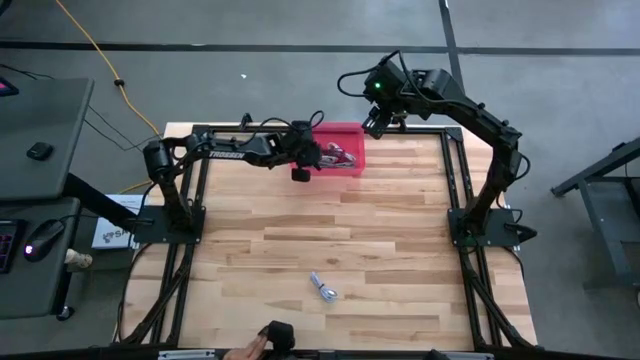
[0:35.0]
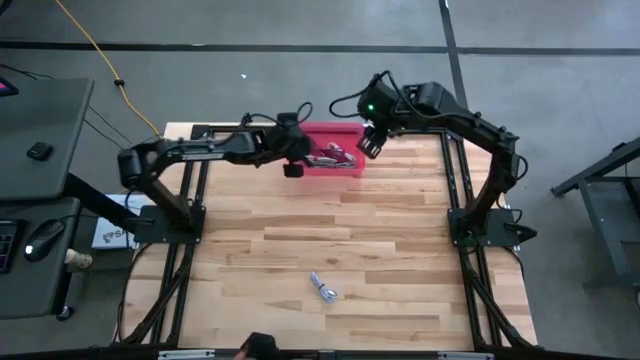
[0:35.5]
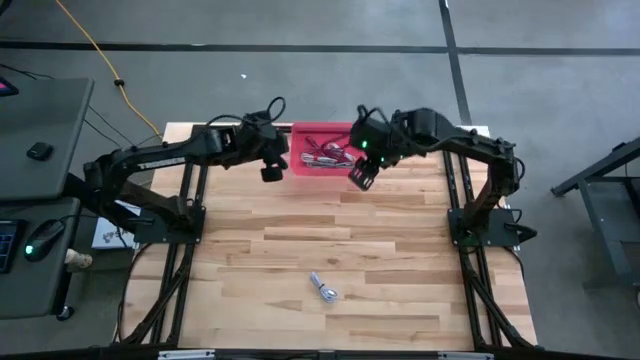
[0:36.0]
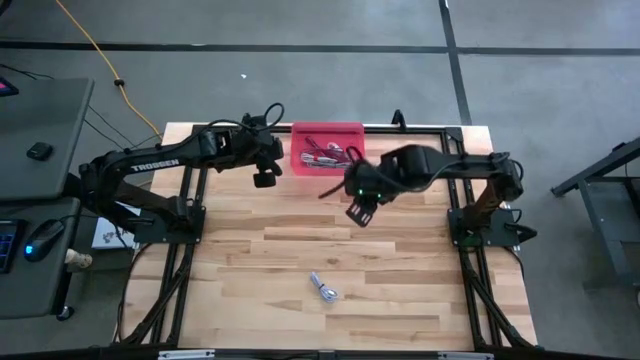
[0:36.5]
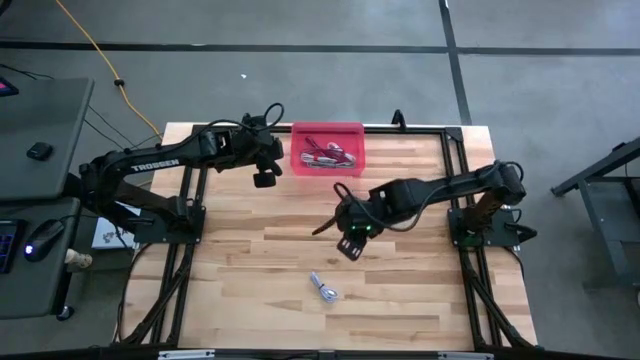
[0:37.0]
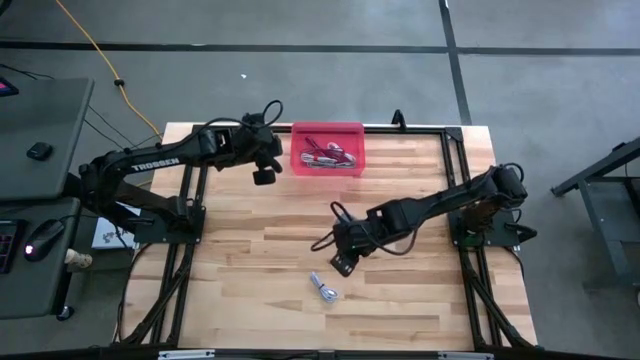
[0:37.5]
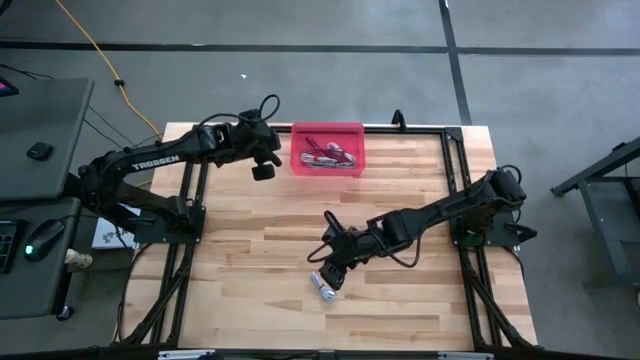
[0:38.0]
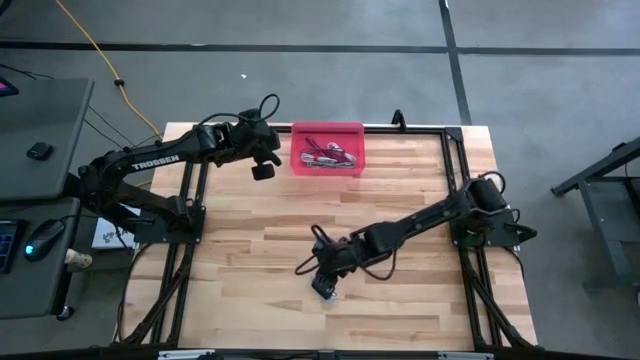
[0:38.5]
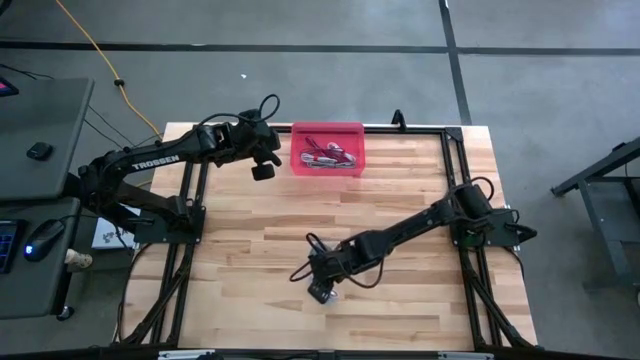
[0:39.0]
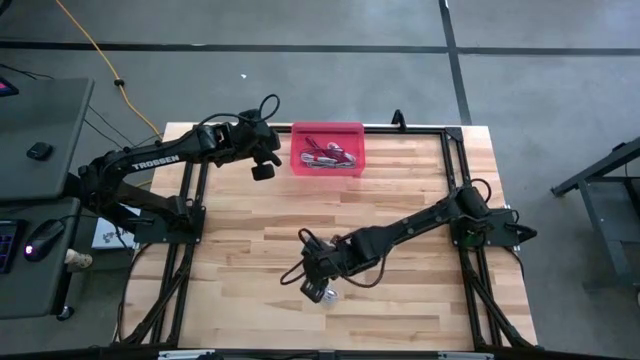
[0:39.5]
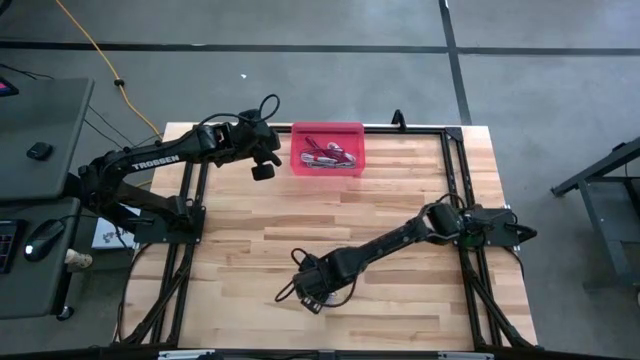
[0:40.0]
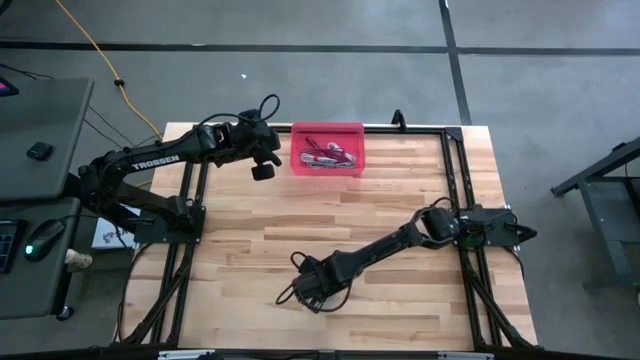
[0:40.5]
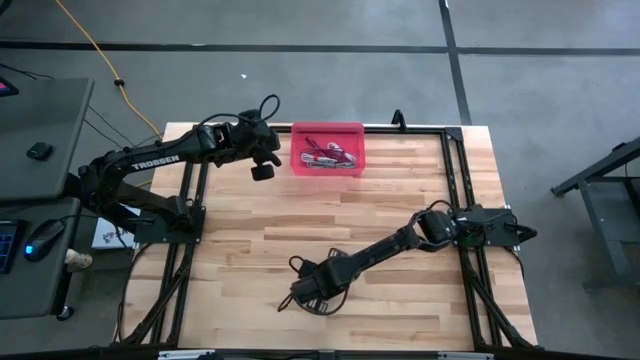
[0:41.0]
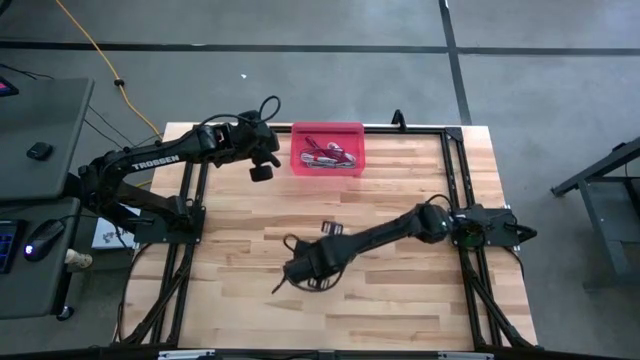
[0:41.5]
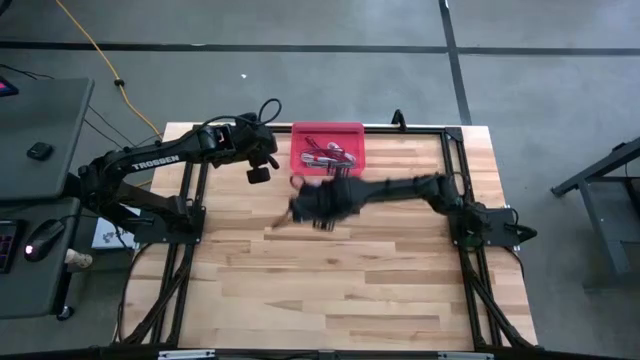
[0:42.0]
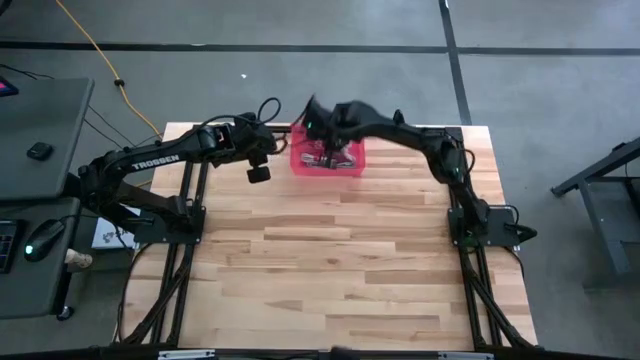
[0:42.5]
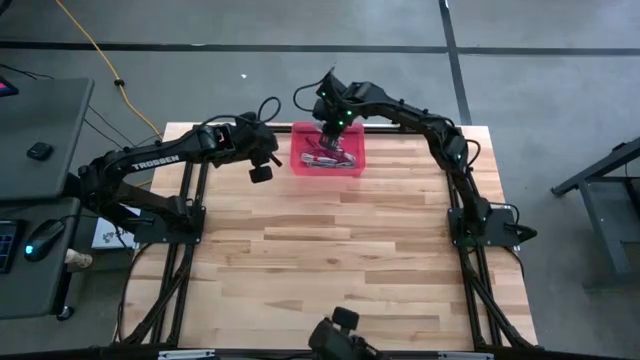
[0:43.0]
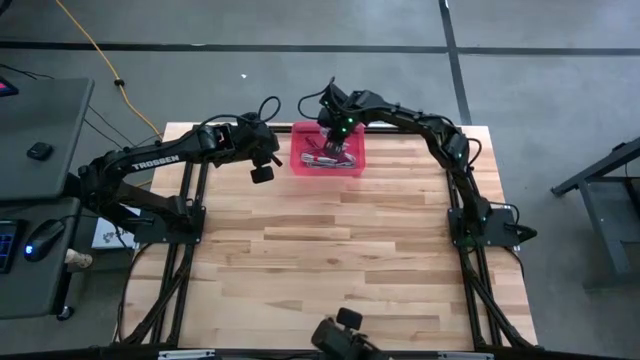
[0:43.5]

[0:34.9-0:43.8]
Put the light blue charger cable into the pink bin

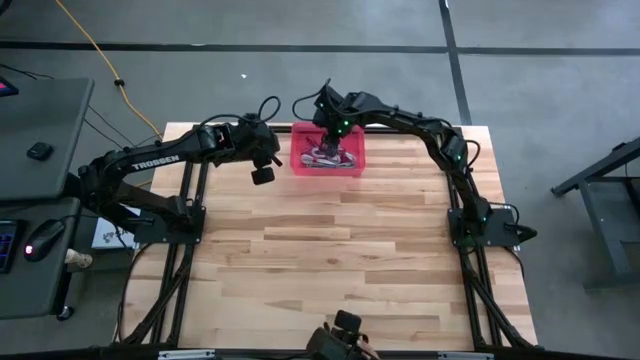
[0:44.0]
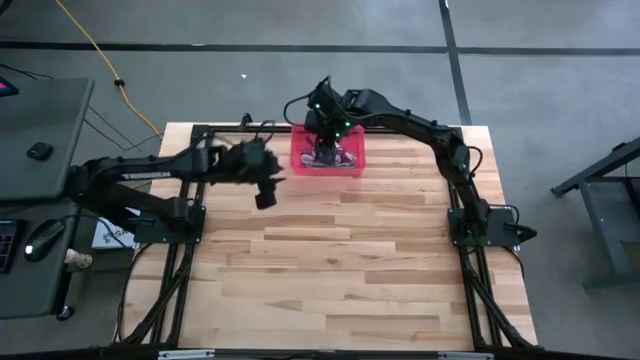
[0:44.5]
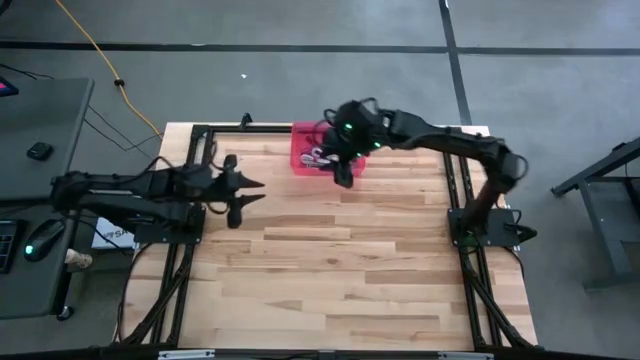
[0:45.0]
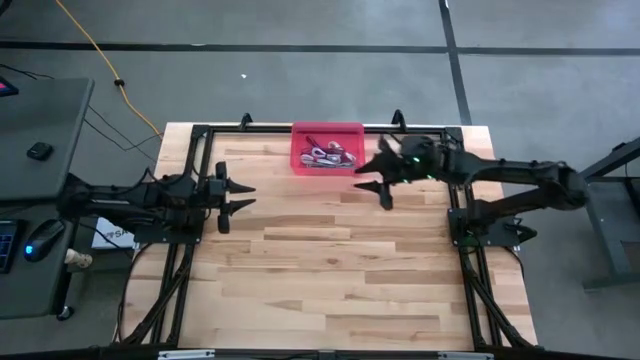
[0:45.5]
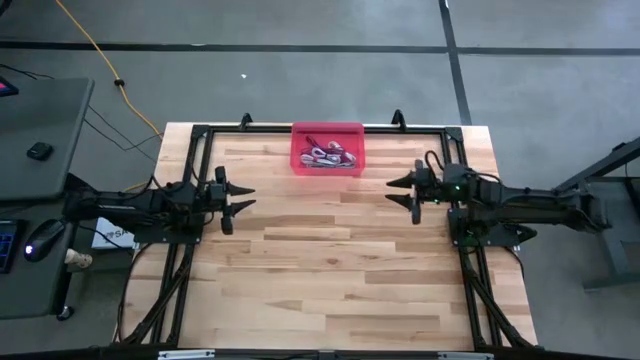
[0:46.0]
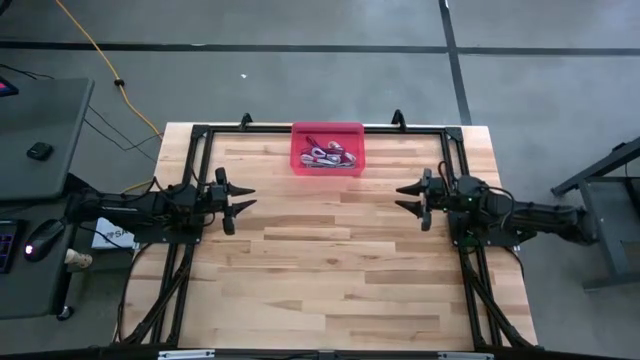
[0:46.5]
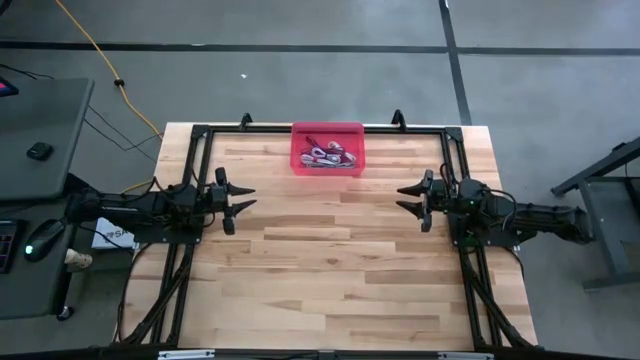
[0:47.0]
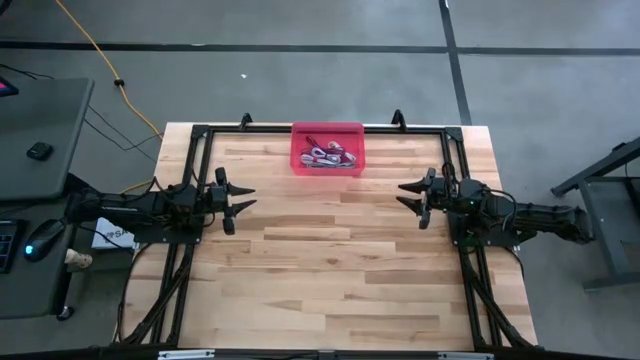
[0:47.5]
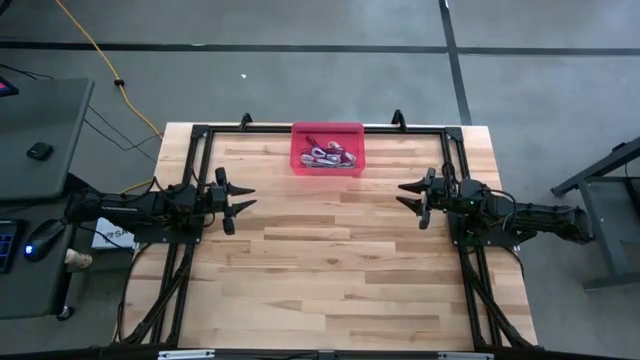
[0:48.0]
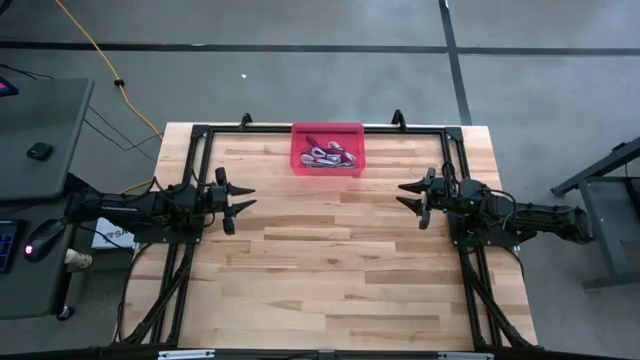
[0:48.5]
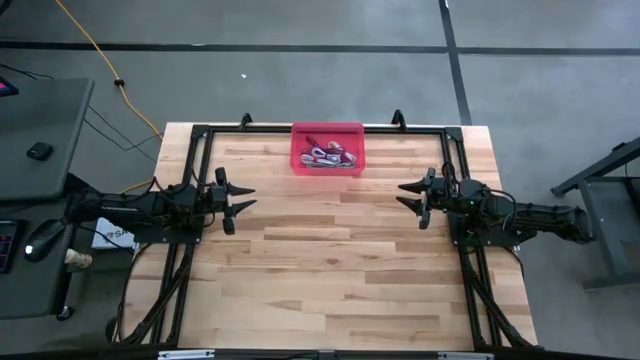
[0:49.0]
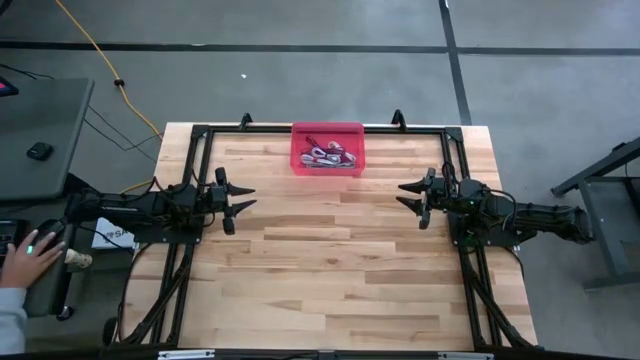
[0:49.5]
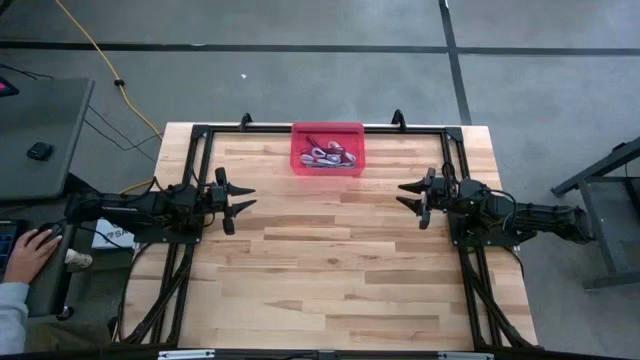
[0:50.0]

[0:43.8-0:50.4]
Return to Home Position

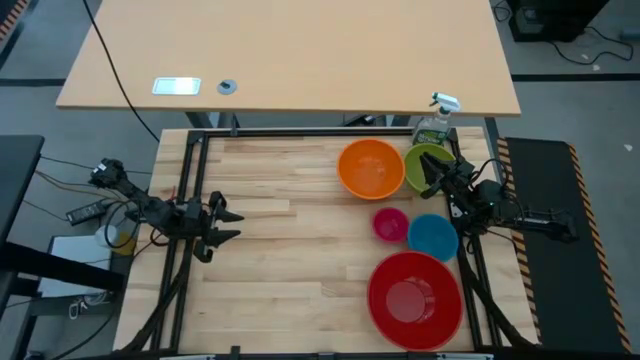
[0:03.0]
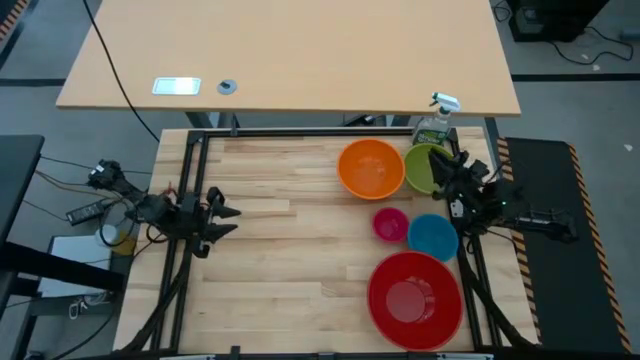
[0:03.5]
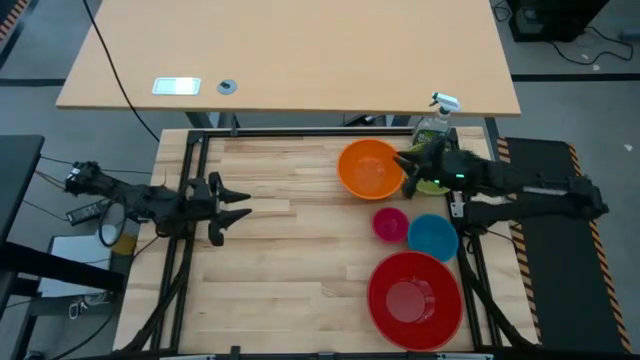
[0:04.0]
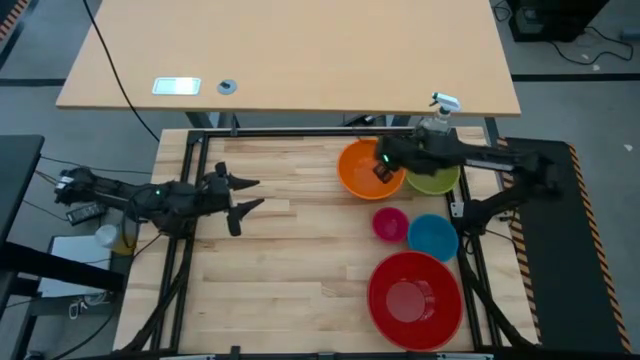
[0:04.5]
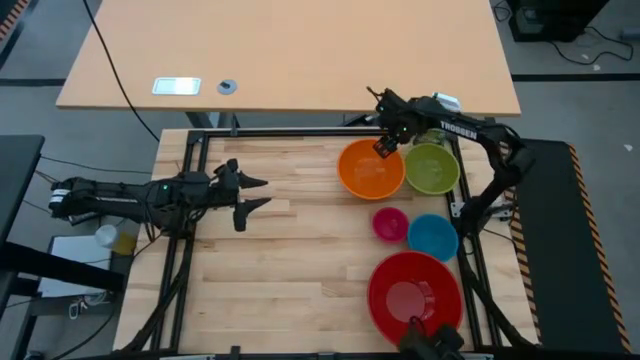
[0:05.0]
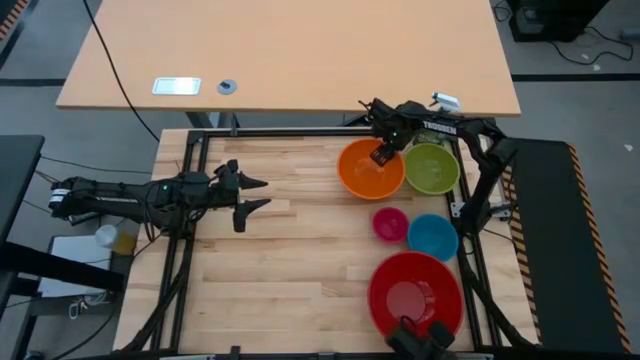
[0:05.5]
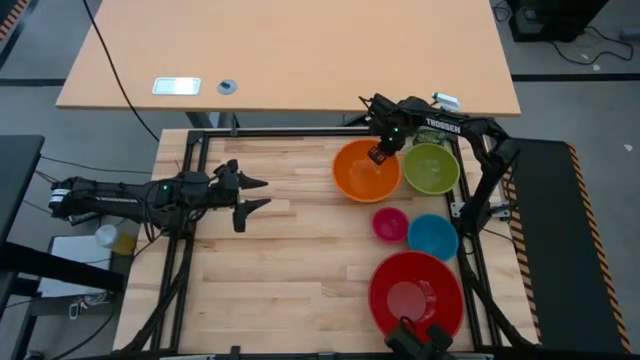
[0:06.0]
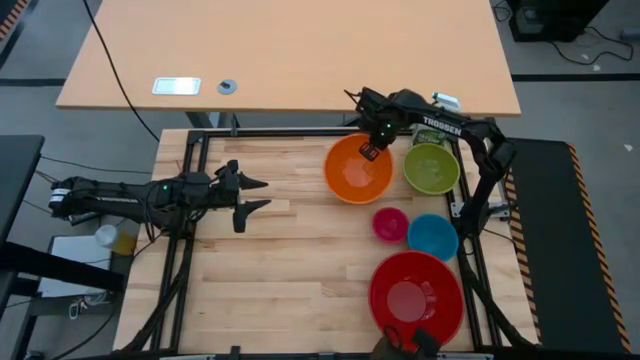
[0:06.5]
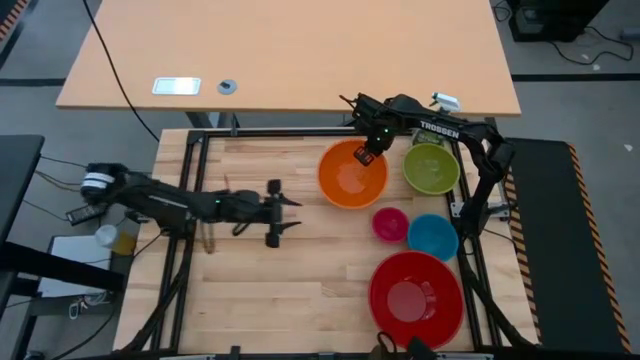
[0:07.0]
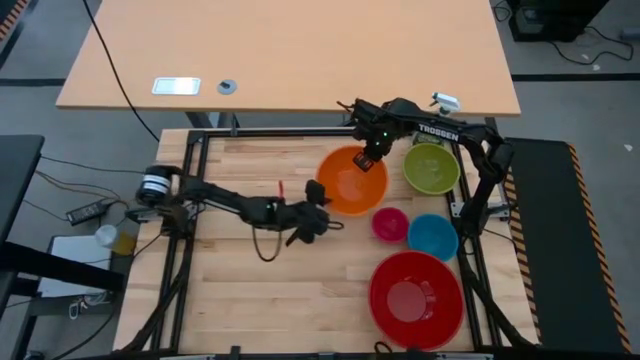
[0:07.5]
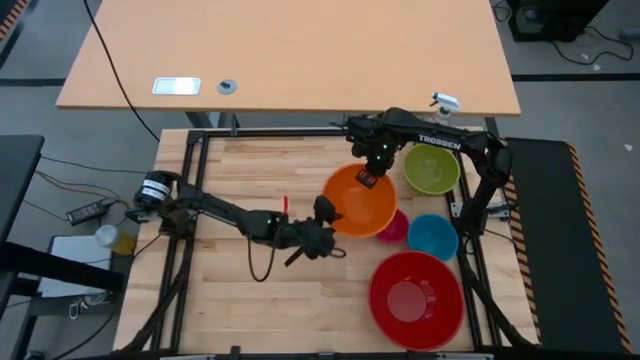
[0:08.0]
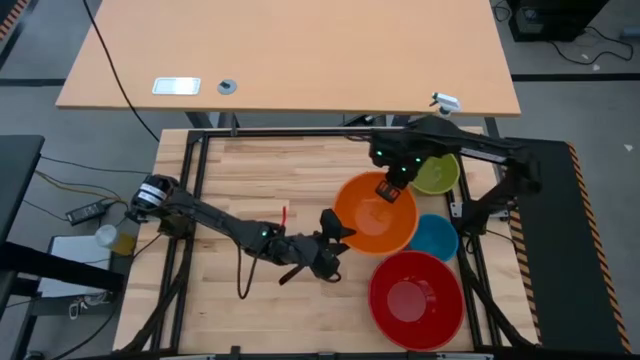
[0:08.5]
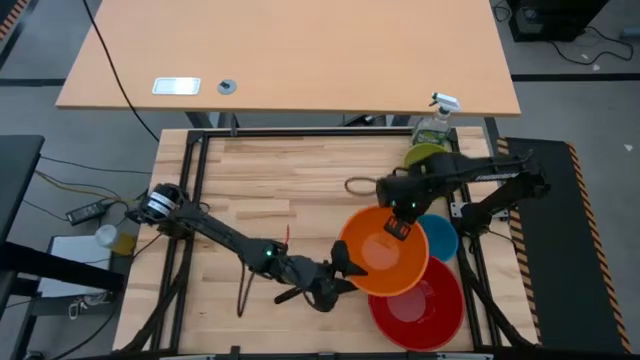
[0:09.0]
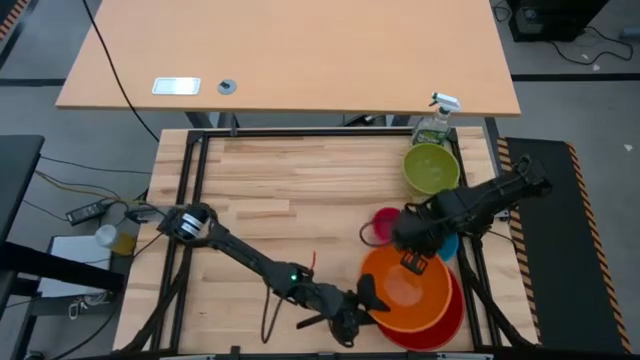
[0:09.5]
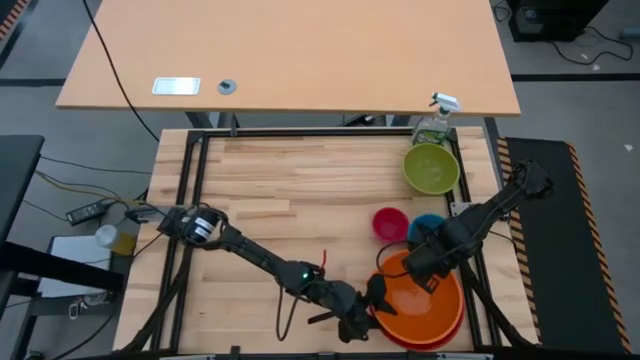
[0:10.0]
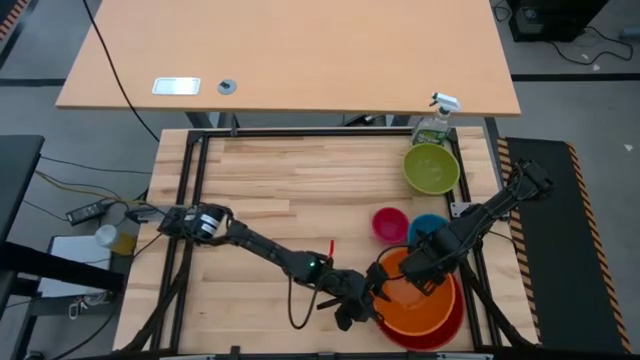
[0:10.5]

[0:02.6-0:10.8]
Stack the orange bowl on the red bowl
